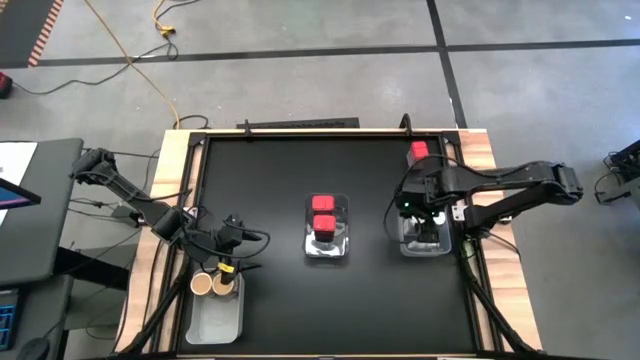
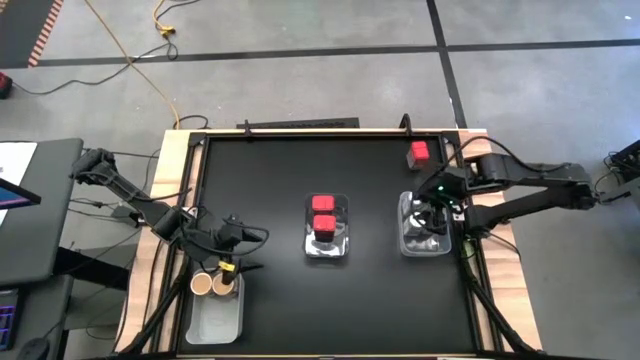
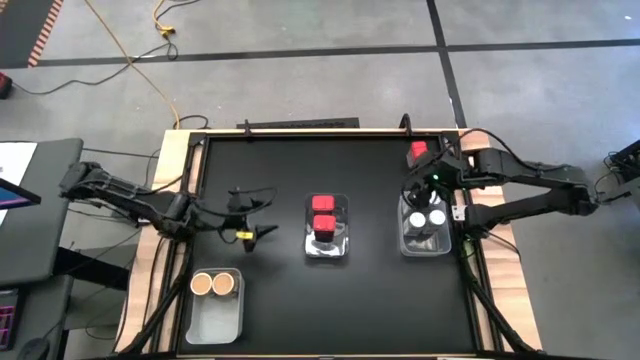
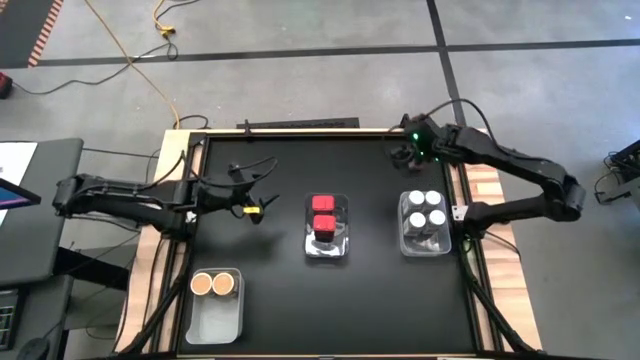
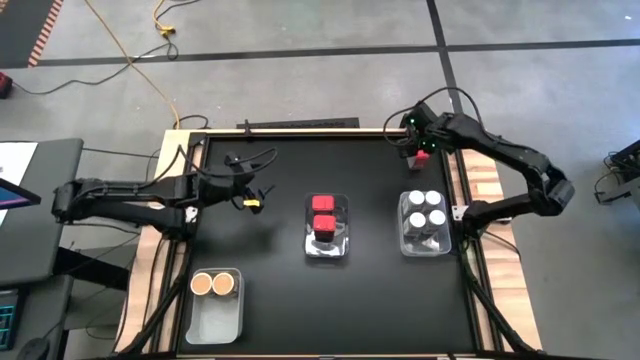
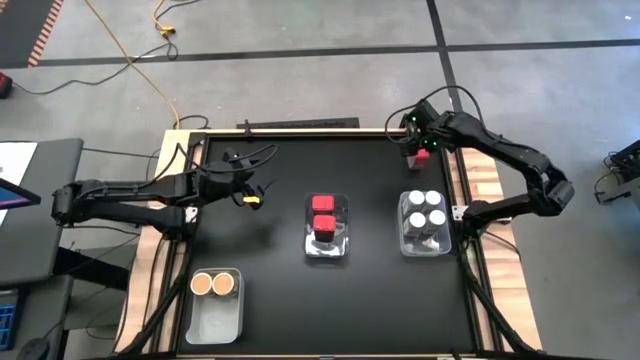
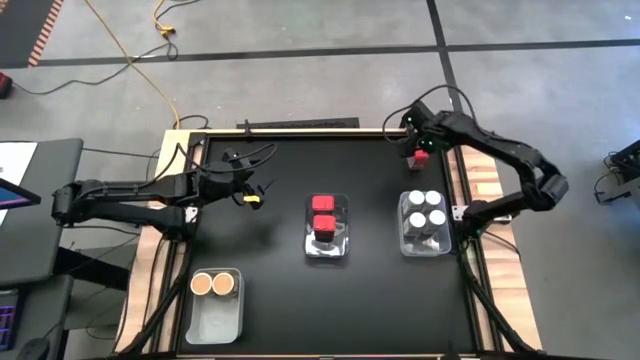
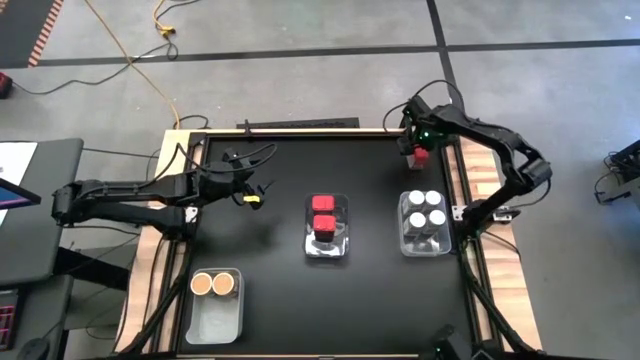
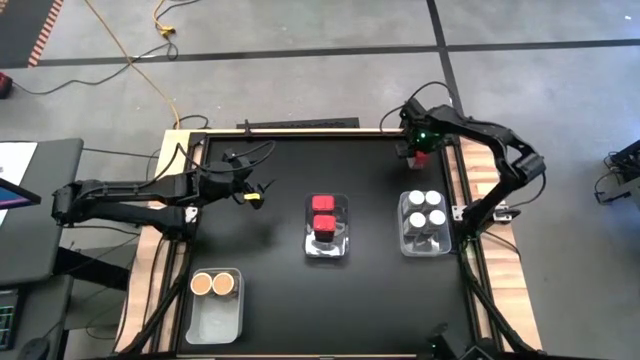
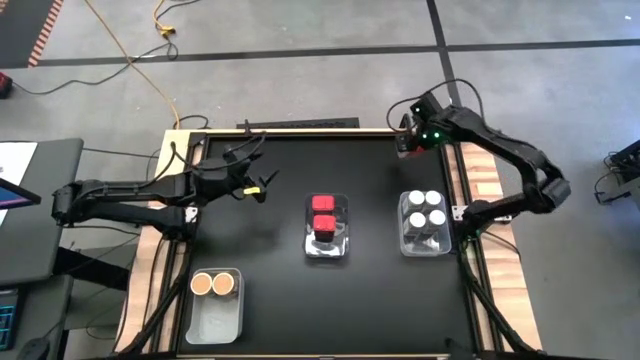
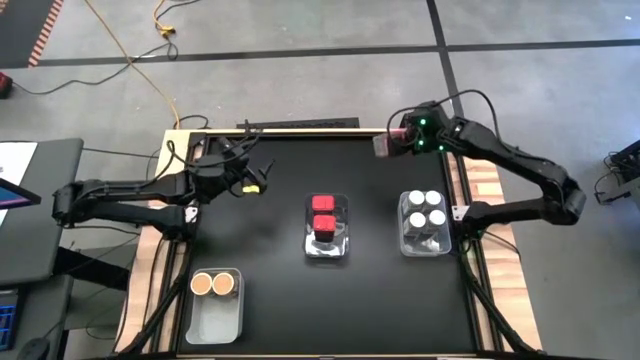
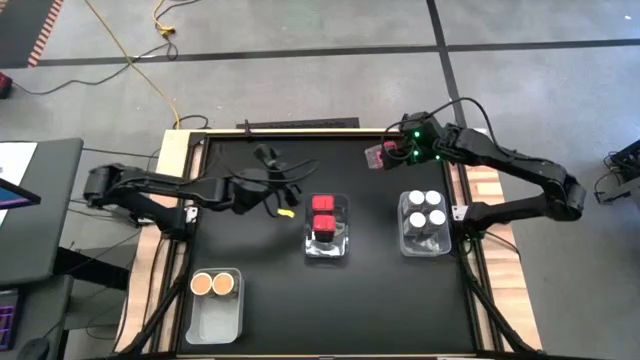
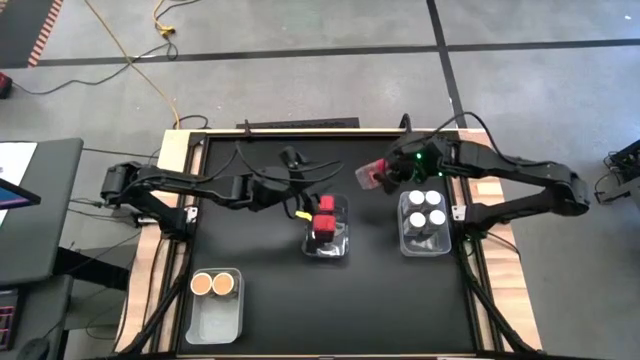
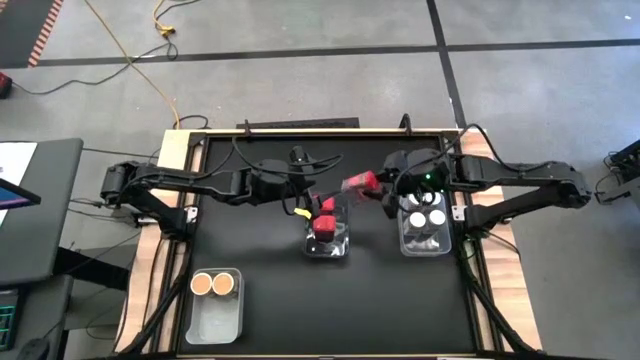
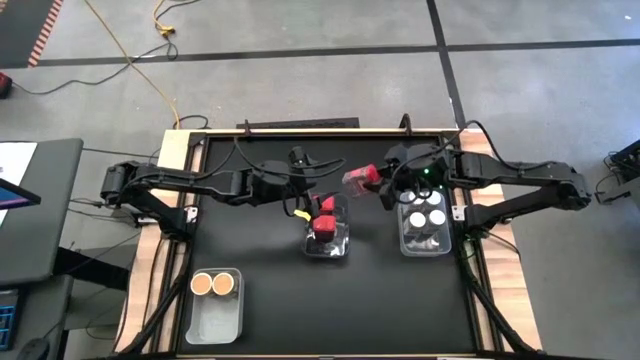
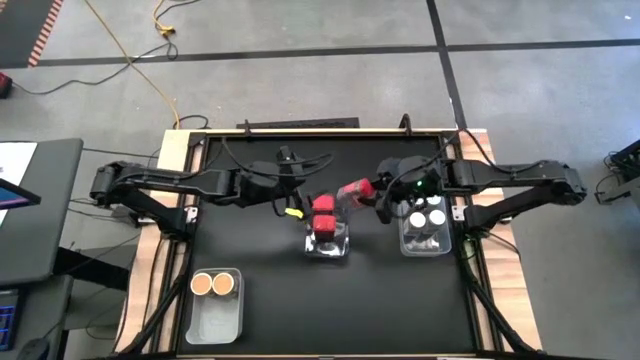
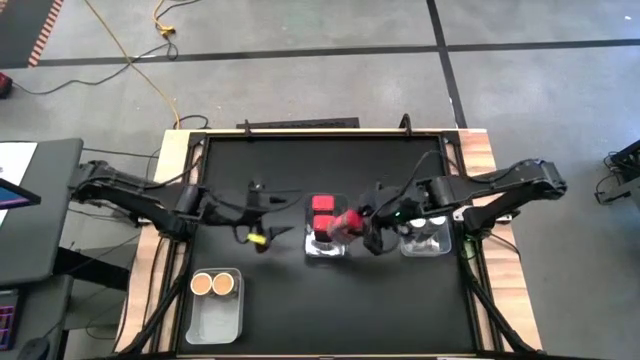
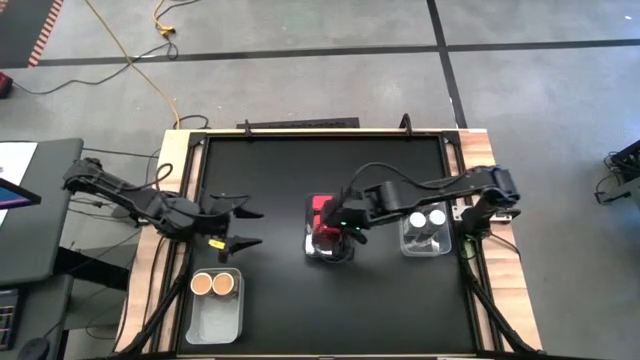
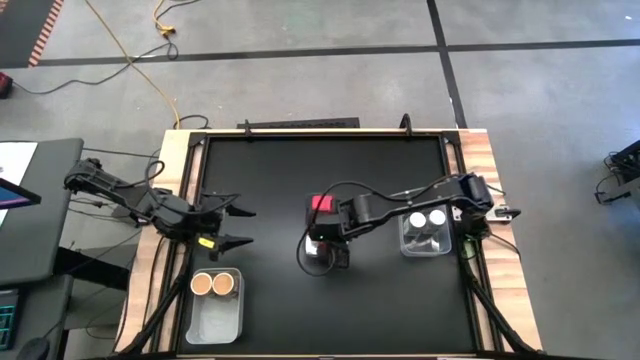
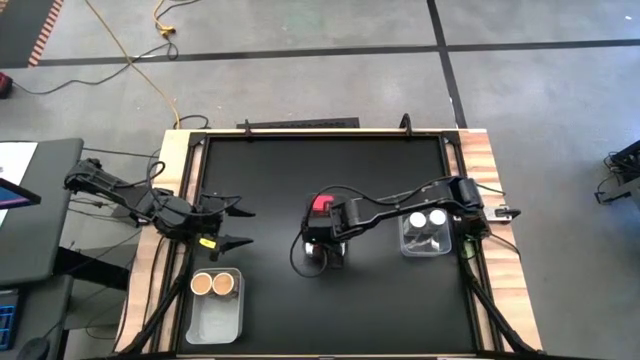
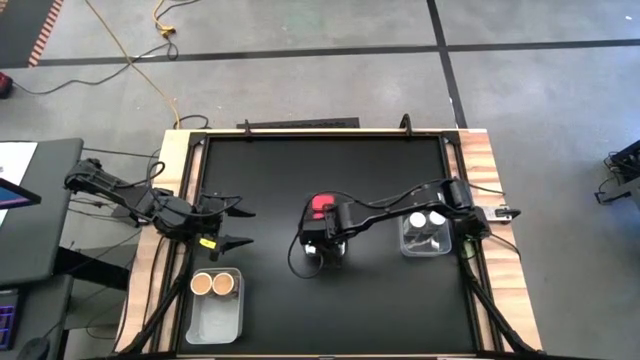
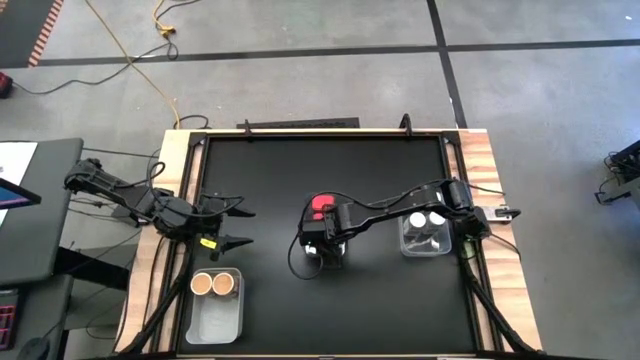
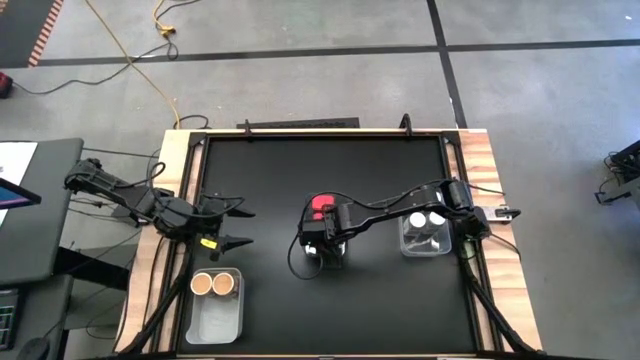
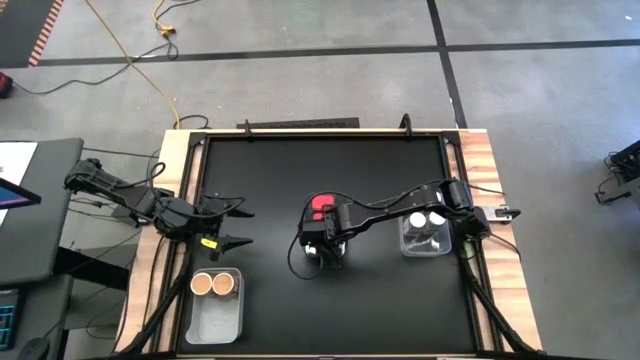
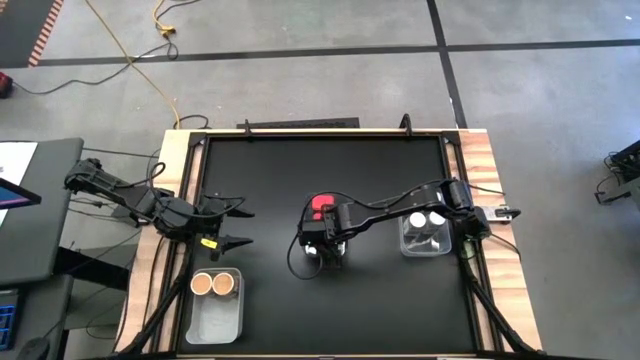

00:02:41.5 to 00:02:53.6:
Task: Sort spices by type
Put the red seasoning can into the black bin

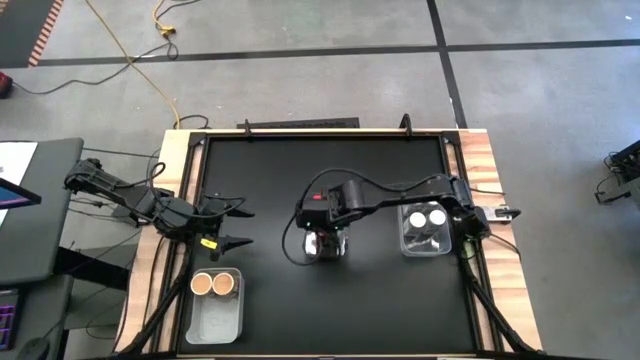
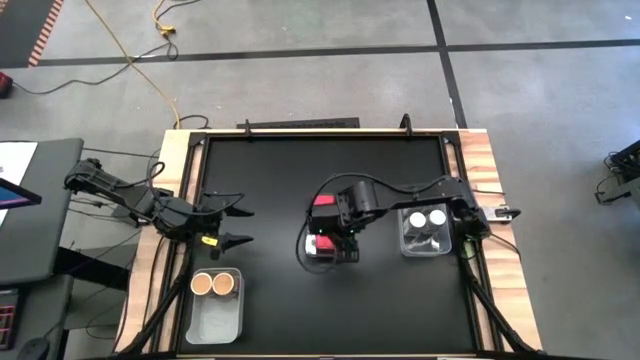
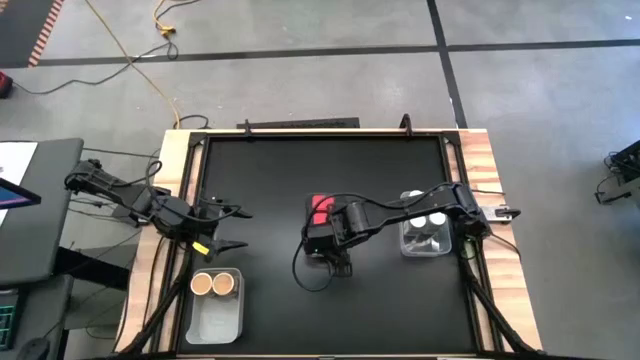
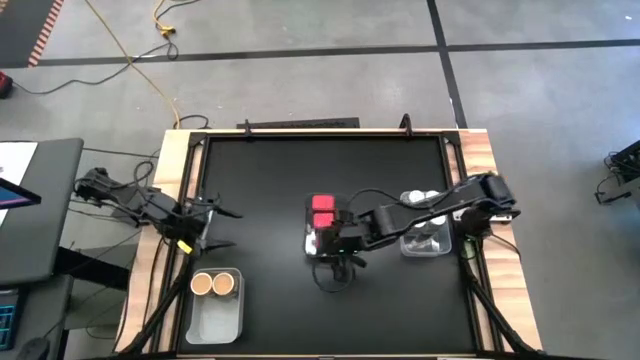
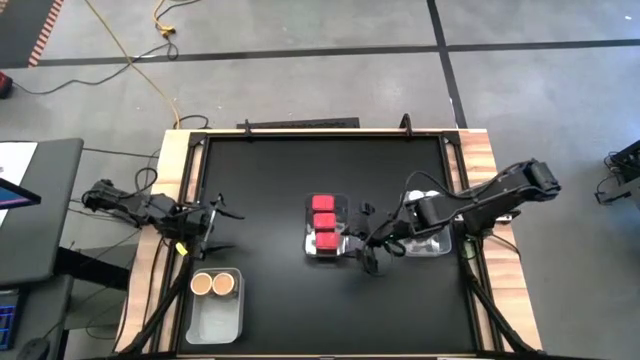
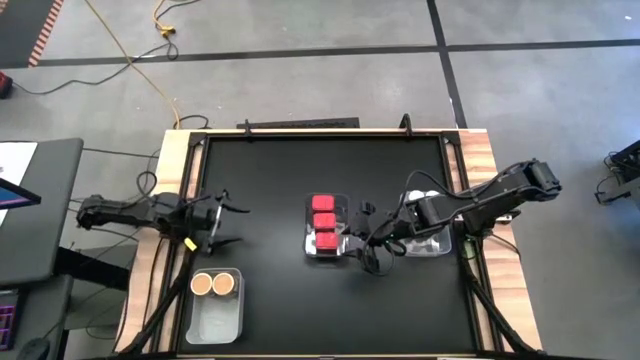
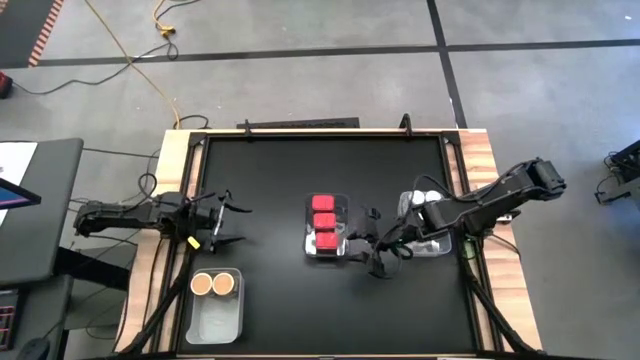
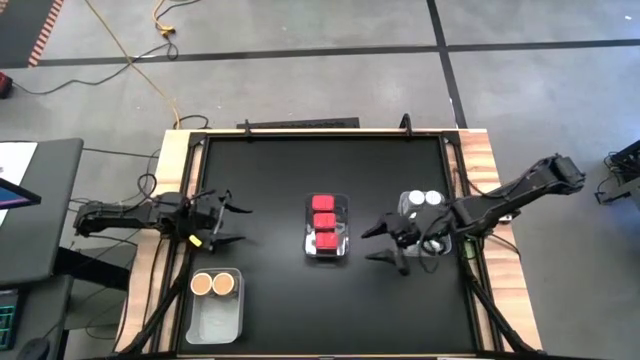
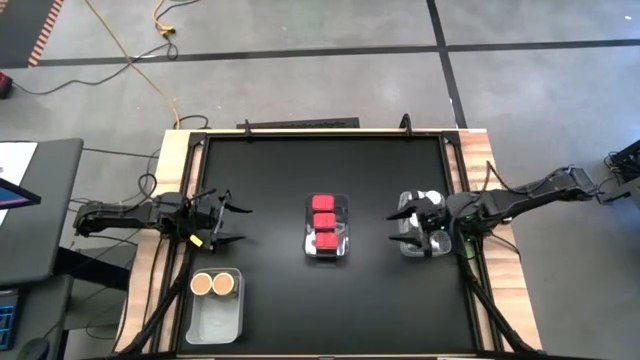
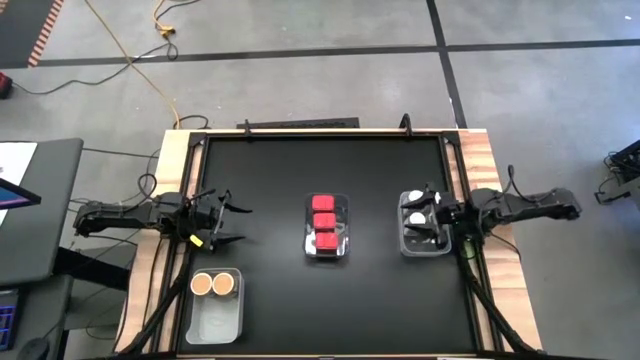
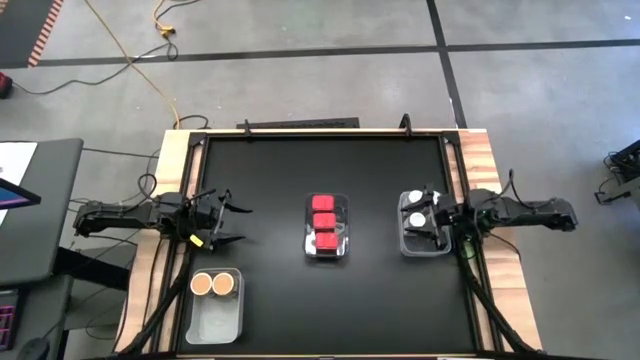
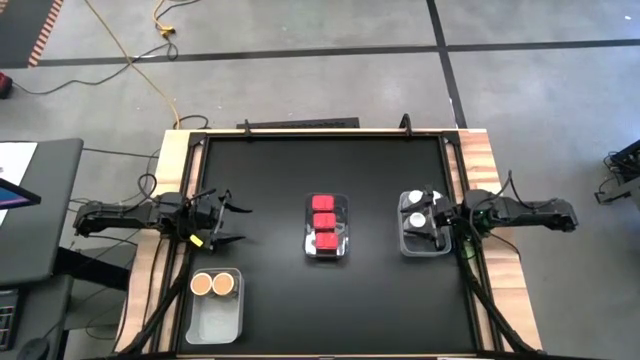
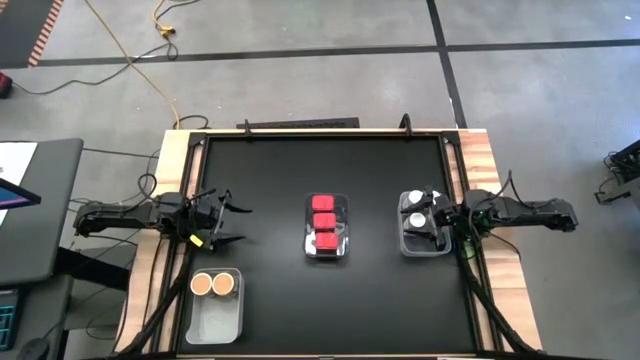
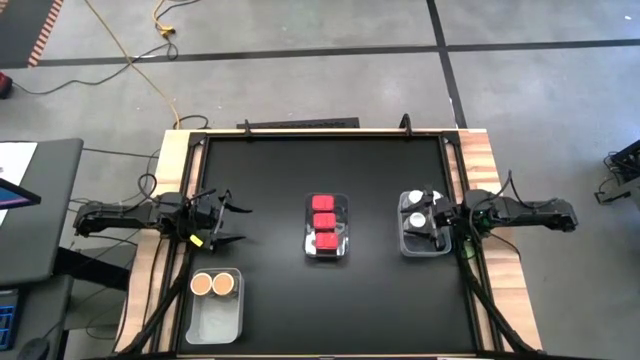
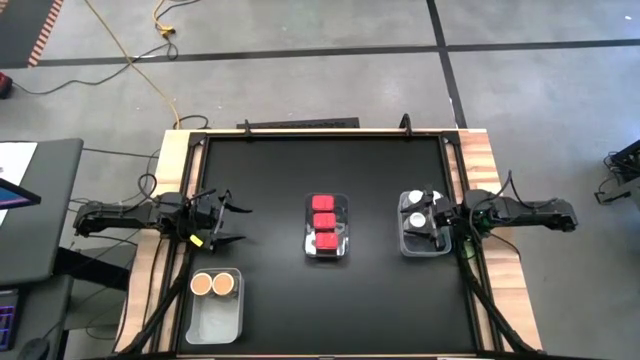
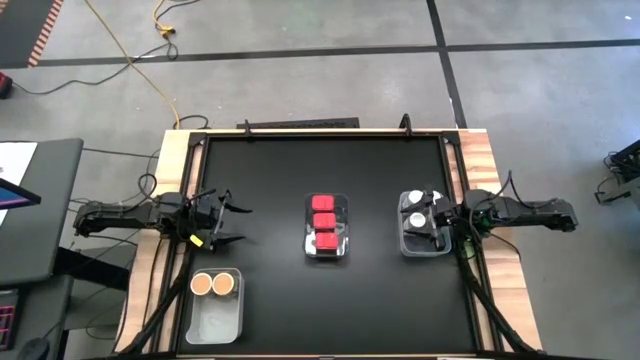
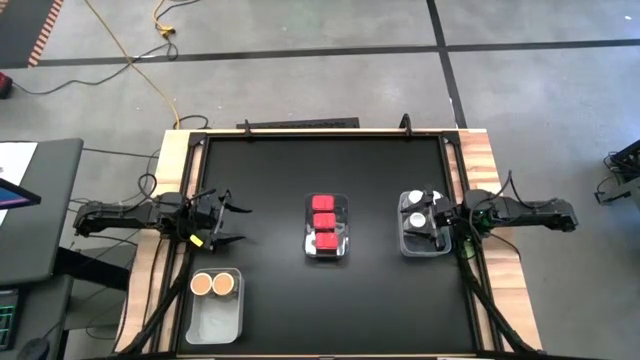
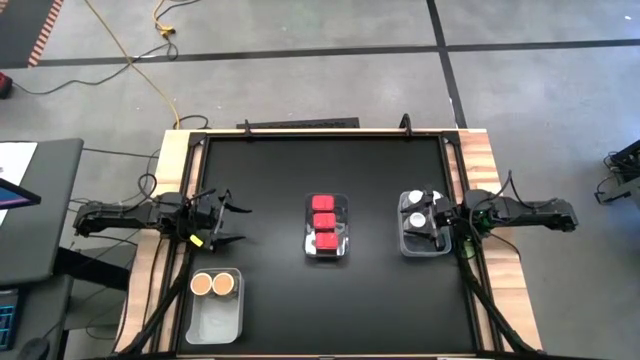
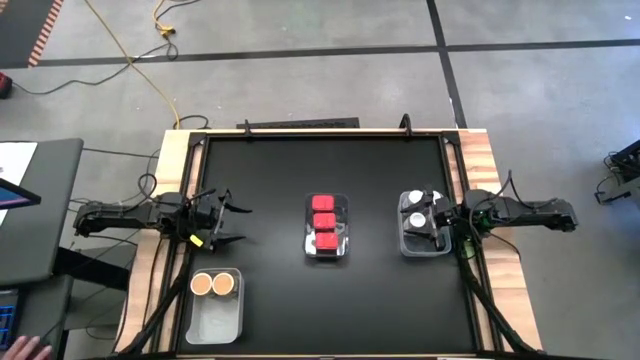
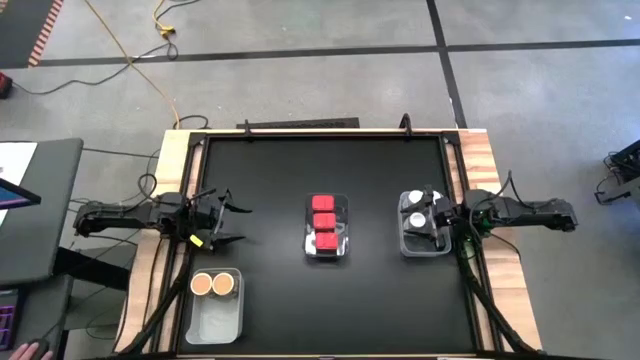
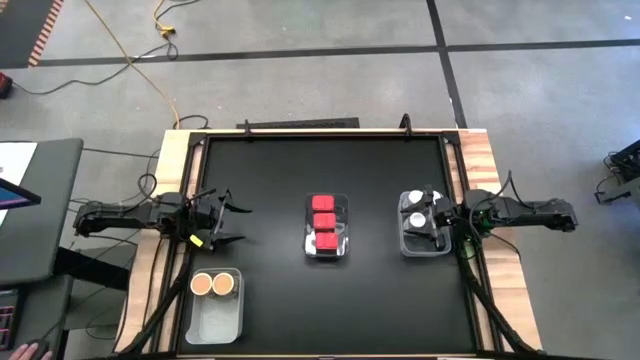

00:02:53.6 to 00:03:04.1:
Return to Home Position
